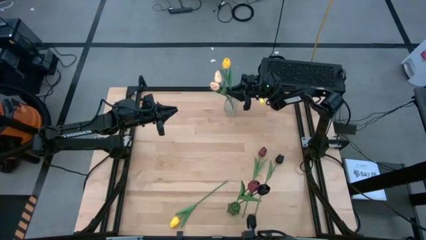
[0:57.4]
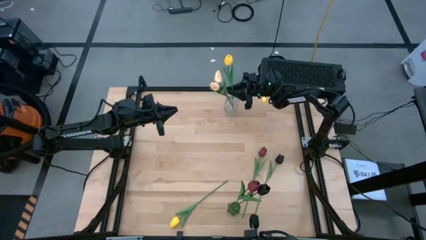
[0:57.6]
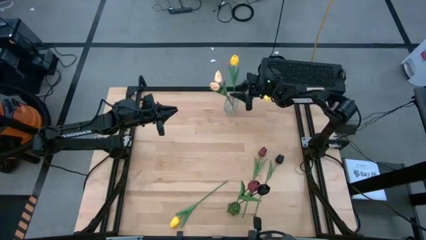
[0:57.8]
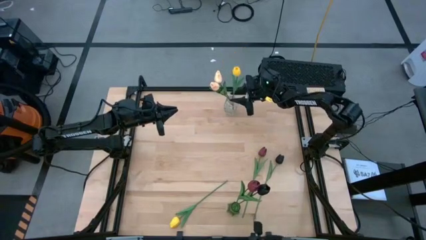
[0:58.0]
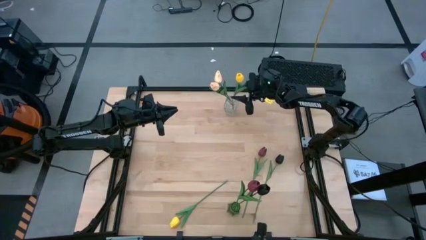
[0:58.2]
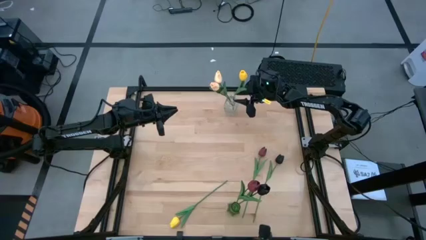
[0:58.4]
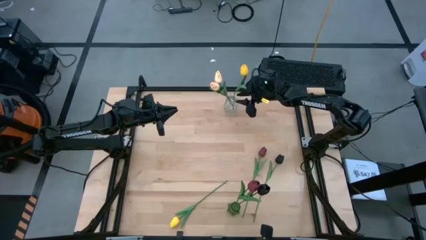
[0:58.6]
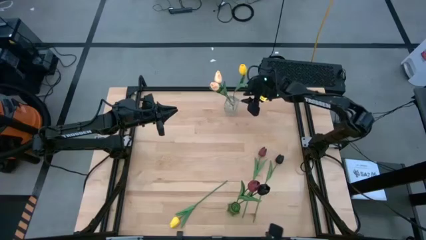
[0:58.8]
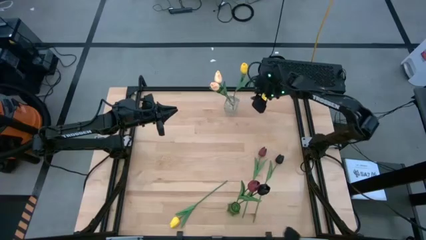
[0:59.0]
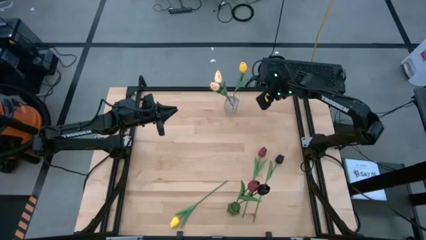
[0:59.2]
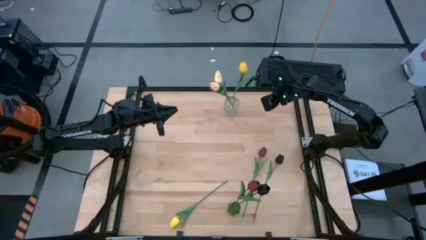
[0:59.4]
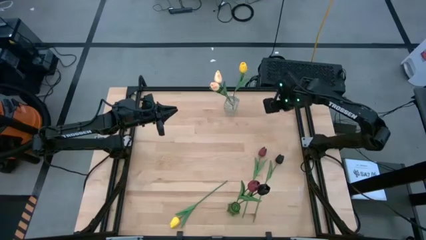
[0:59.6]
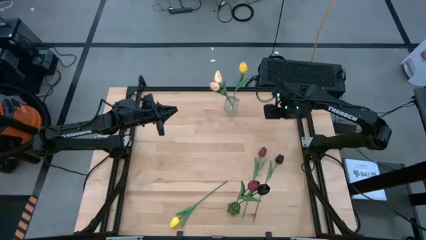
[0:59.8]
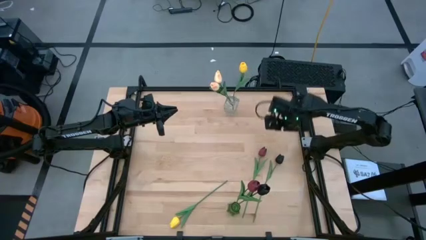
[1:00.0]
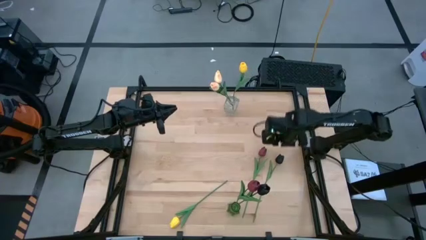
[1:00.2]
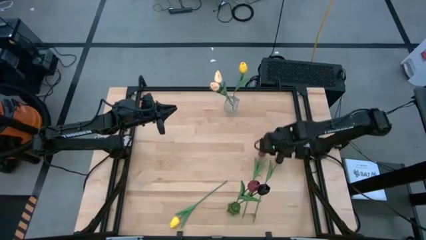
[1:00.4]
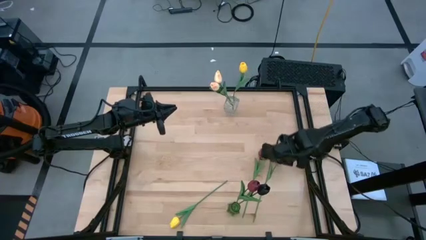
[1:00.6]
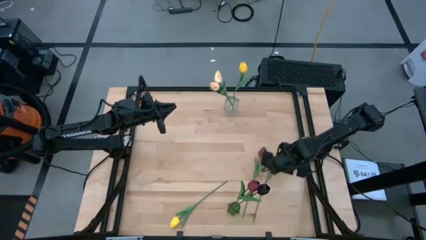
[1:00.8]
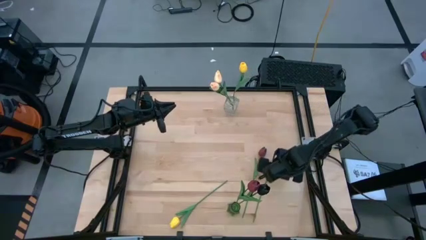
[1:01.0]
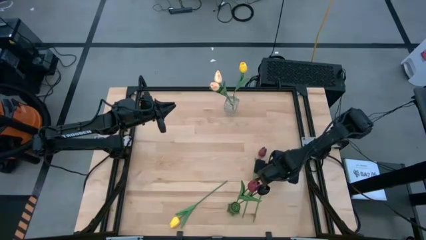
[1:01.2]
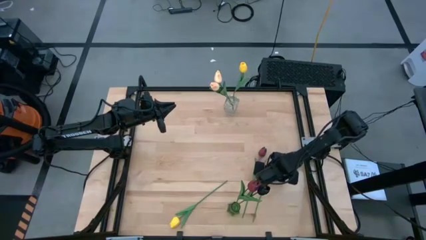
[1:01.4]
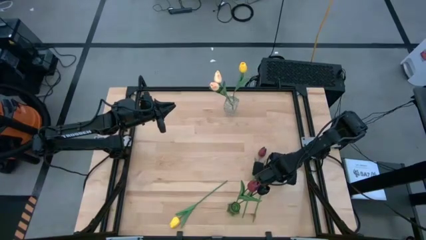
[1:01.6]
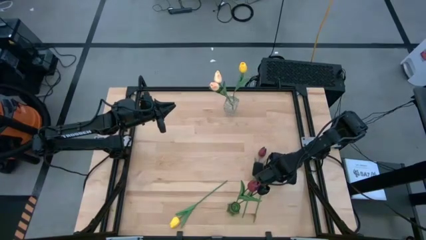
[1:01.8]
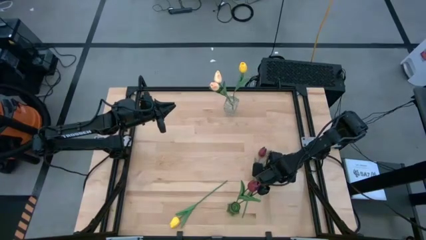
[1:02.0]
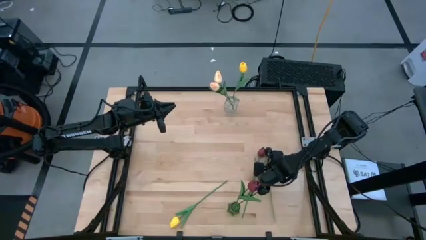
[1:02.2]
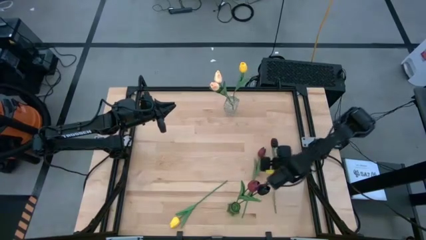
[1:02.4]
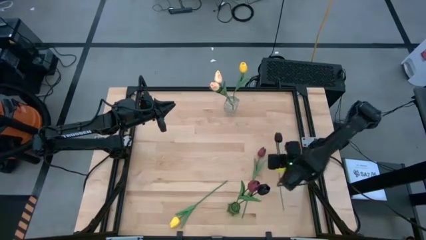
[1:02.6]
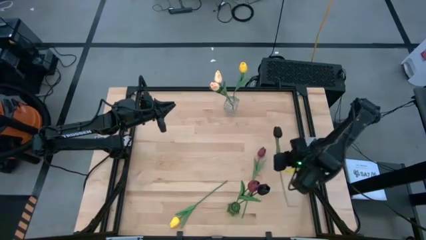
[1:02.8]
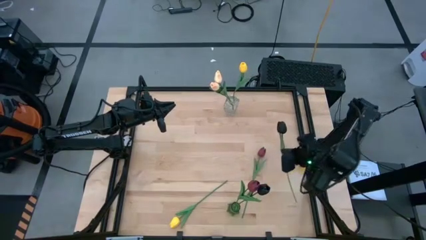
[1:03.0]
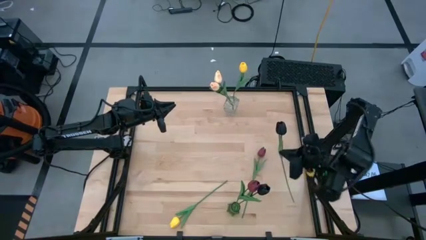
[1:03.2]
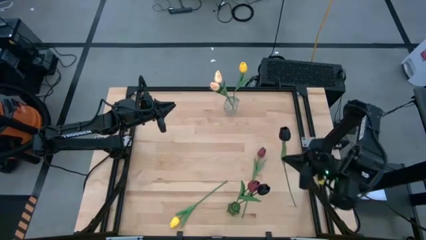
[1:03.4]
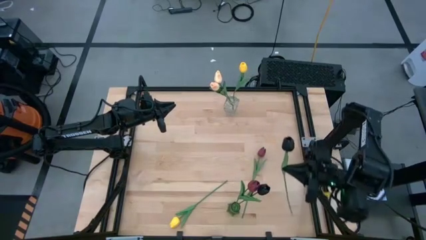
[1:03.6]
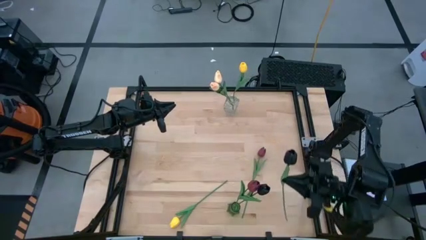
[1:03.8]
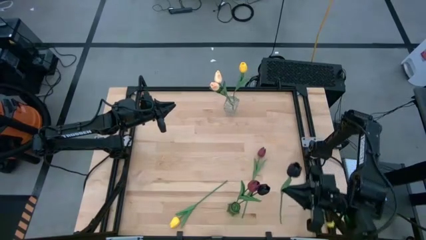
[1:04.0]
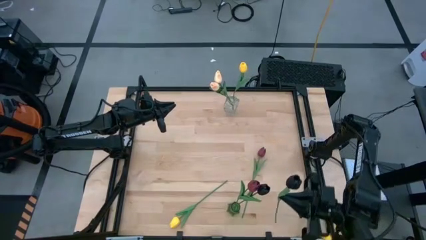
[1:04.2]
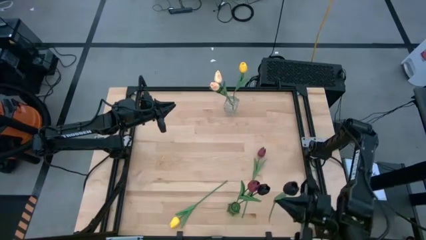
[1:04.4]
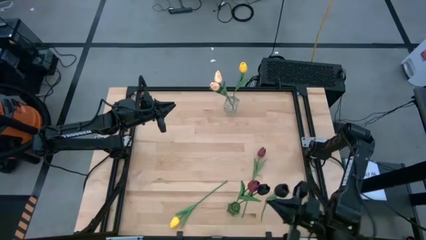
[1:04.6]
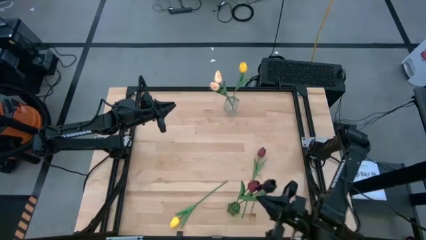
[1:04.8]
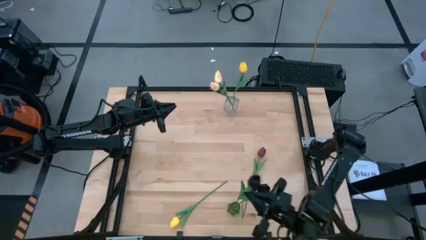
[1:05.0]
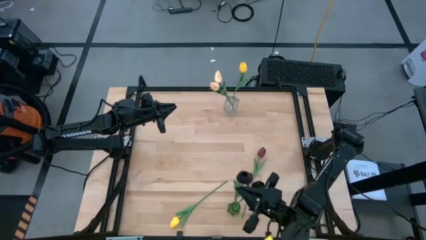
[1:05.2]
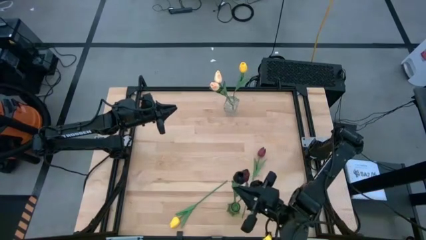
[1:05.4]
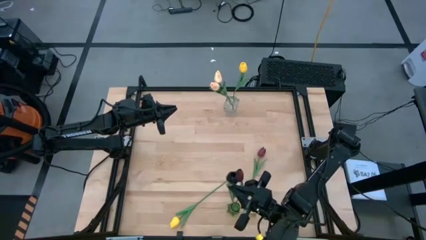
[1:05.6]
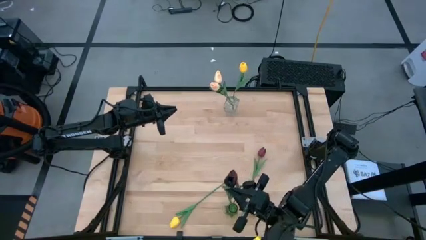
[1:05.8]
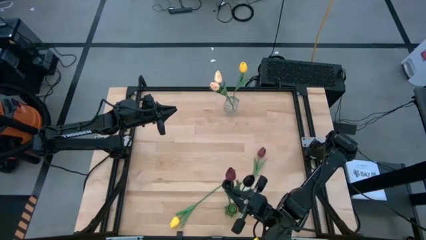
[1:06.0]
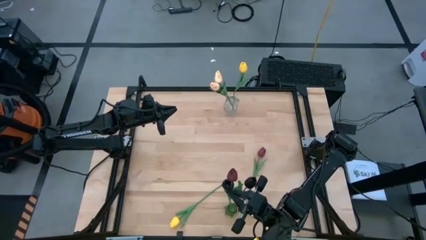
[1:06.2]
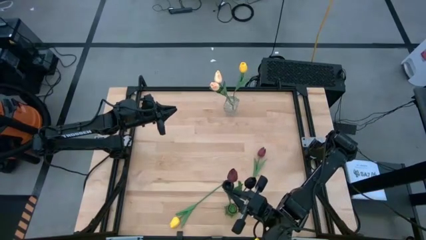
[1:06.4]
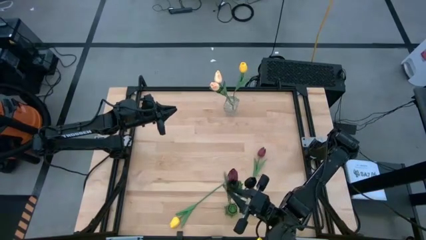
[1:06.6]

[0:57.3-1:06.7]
Task: Sort flowers into vase by color
Put the black tulip into the green flower vase

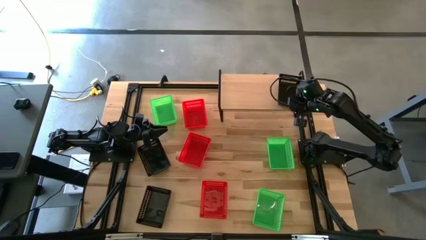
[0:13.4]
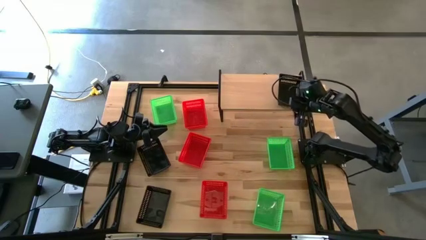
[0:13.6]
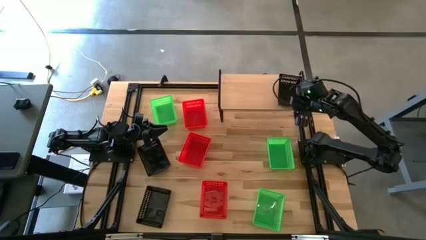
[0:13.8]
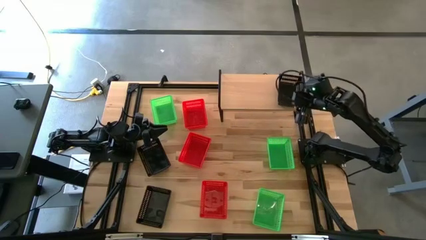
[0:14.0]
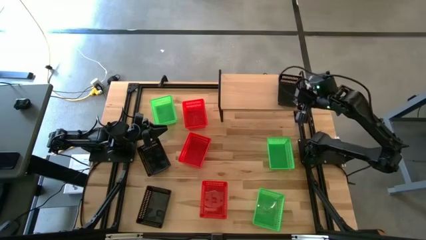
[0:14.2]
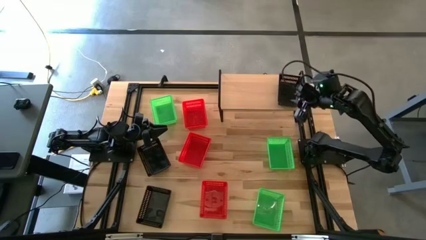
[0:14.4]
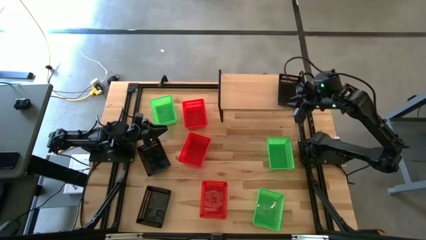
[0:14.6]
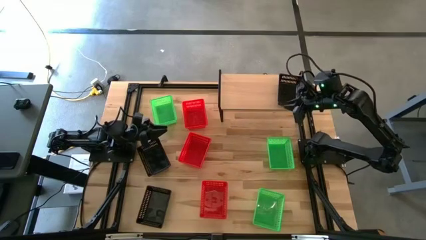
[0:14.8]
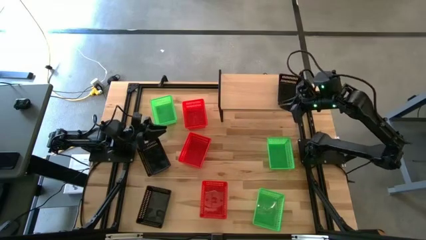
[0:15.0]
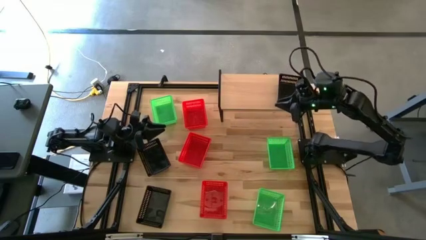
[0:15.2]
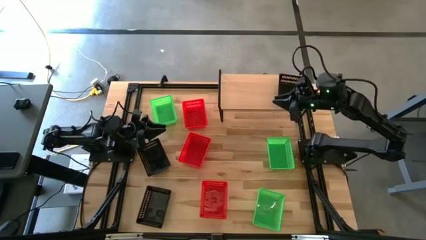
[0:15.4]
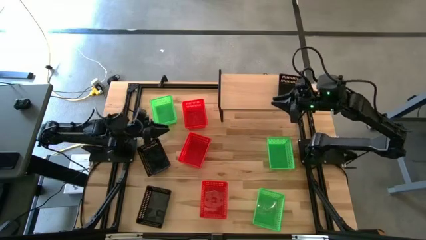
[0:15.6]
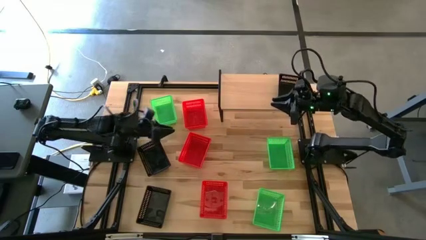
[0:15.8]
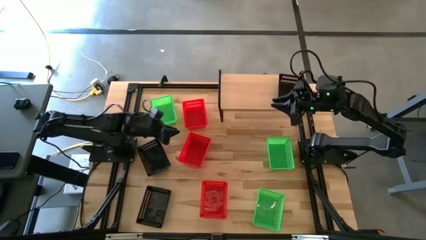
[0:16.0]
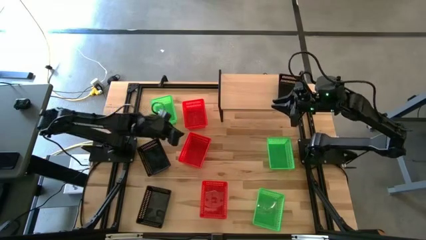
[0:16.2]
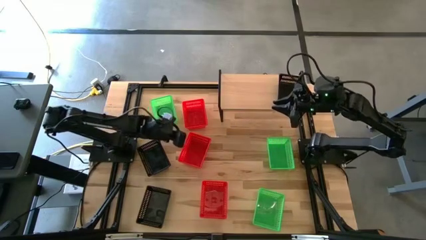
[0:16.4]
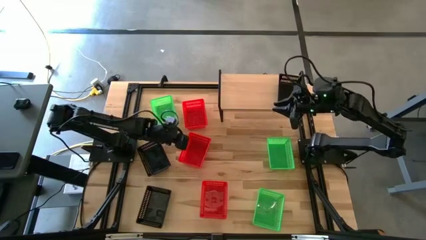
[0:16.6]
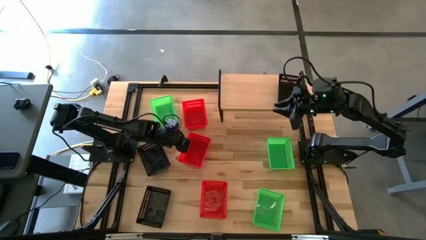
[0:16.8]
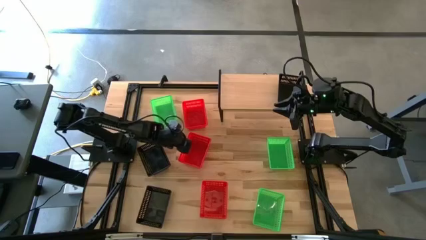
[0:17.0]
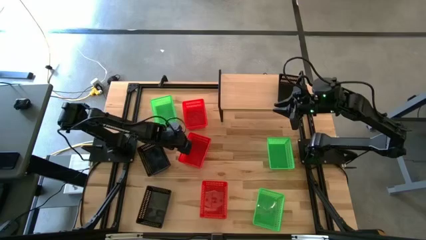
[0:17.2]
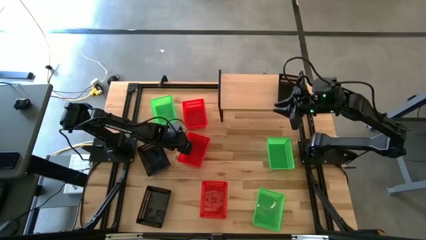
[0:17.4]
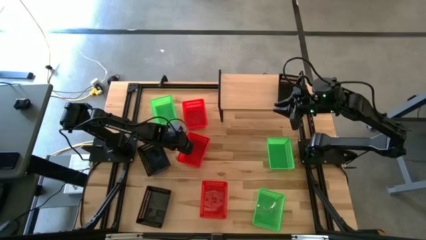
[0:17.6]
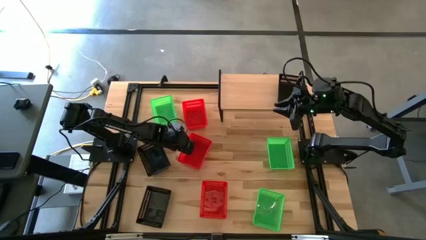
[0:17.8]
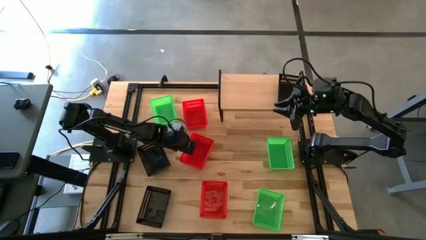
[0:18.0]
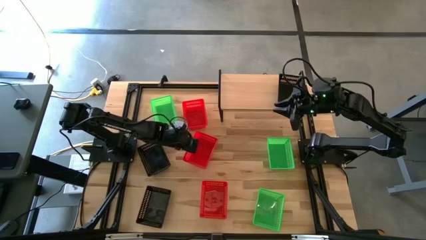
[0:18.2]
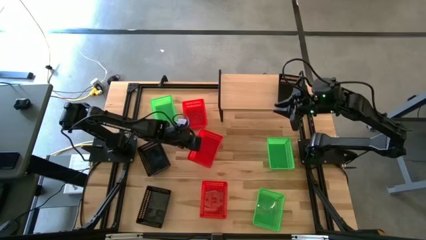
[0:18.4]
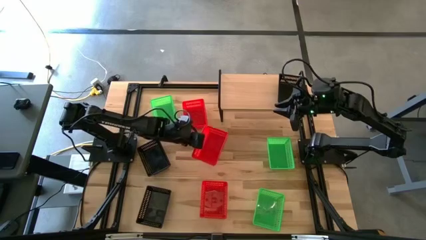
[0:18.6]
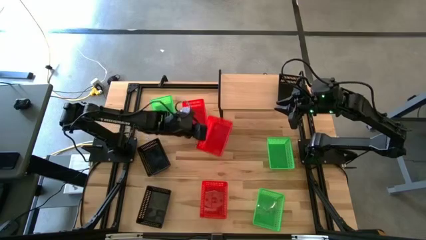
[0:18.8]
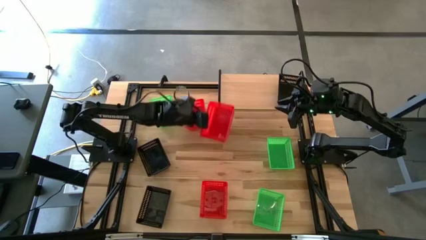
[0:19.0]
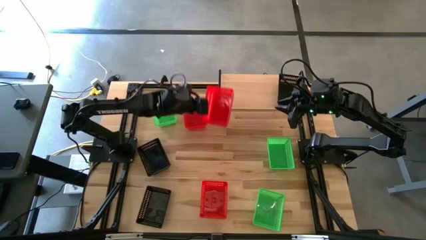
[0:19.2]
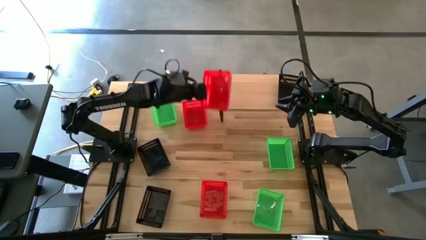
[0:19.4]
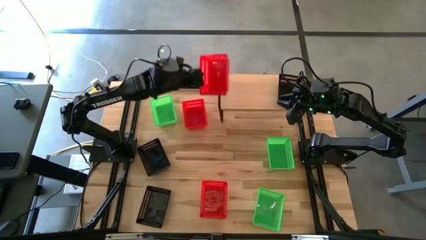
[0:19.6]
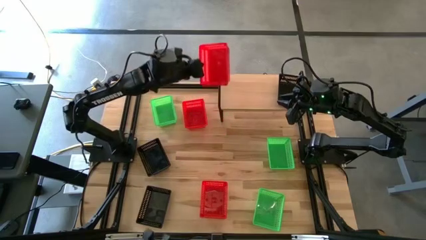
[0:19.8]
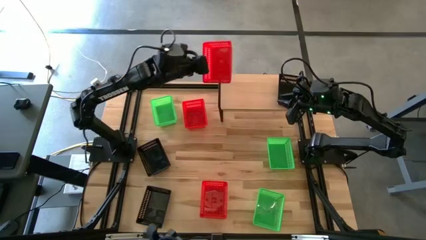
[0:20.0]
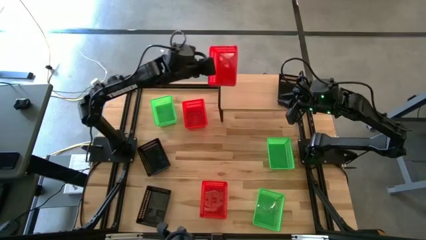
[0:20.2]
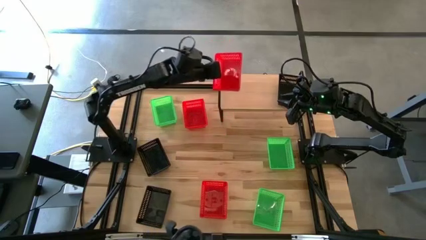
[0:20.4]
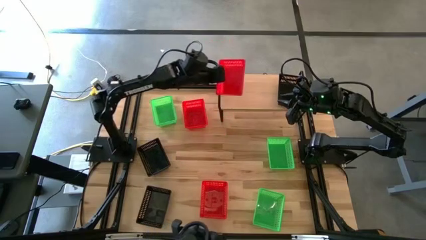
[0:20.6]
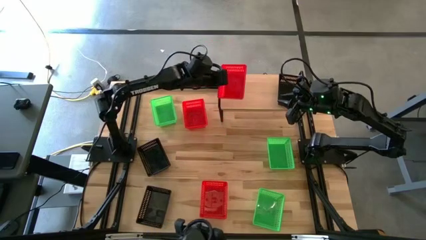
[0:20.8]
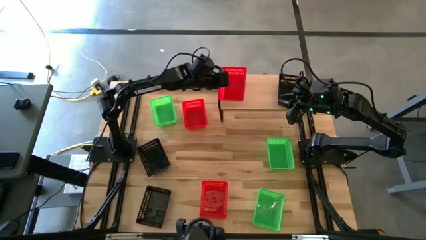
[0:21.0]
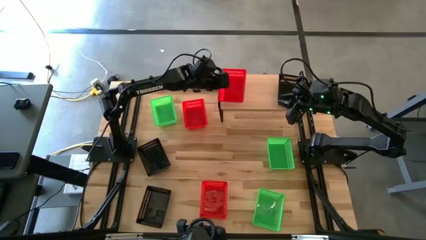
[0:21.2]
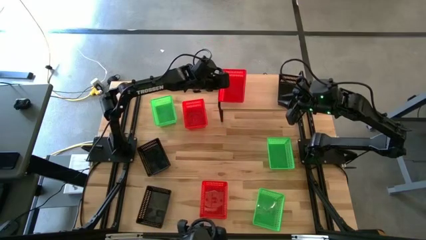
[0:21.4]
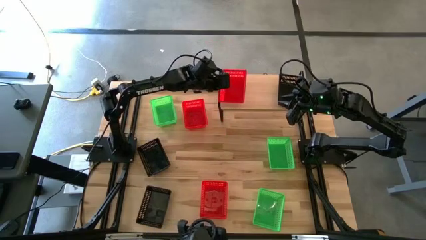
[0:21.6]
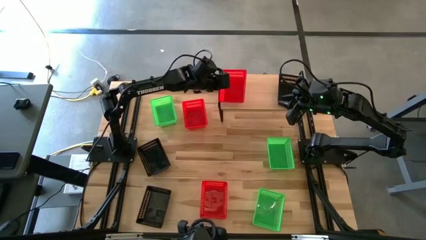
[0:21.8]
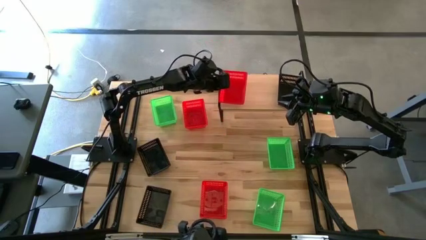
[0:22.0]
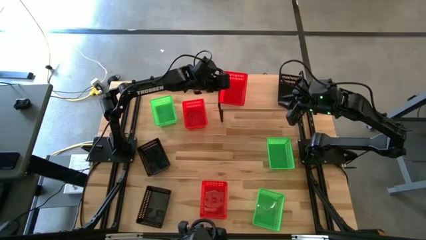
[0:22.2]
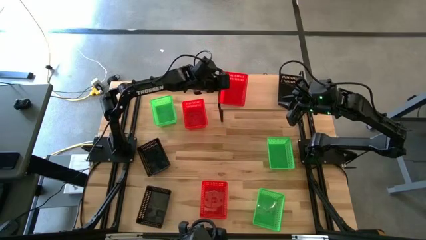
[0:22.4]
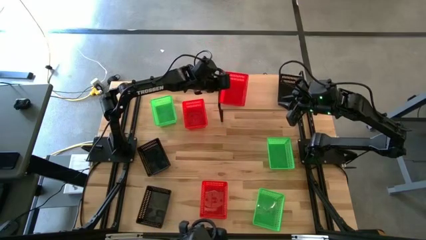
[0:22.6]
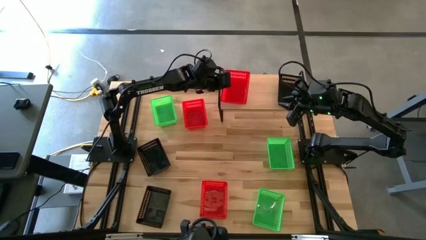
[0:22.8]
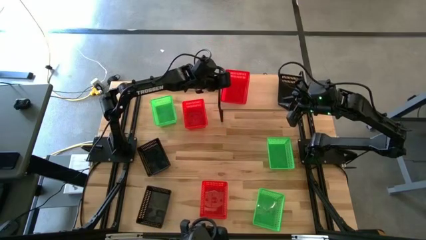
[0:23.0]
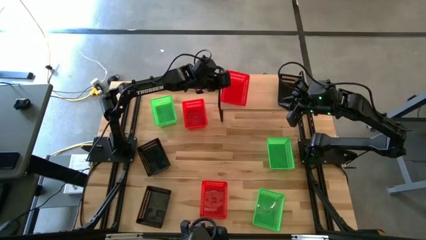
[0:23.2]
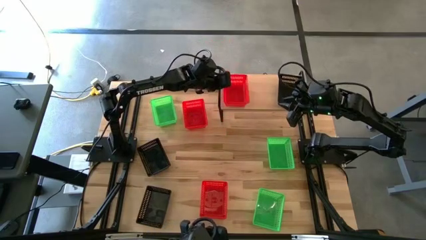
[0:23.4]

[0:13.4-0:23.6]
Task: Stack baskets on shelf by color
Put the middle red bin on the shelf
